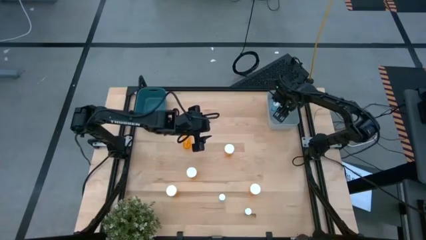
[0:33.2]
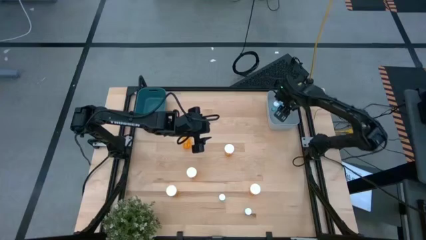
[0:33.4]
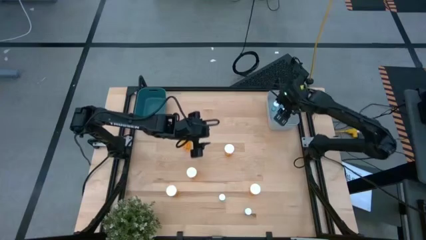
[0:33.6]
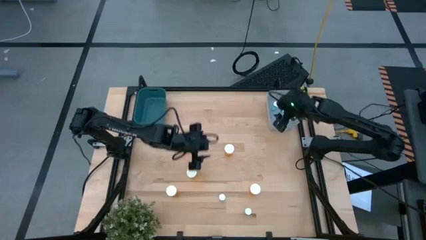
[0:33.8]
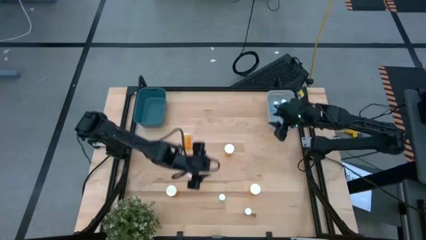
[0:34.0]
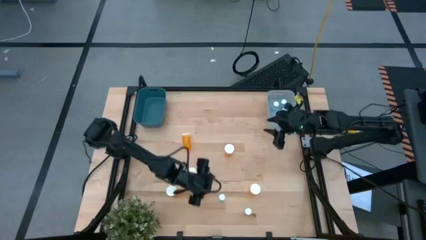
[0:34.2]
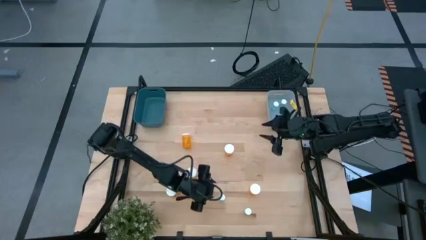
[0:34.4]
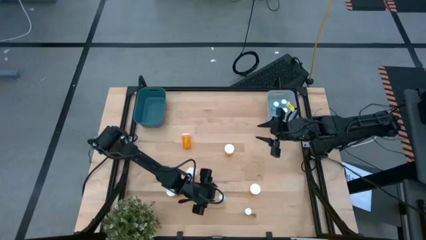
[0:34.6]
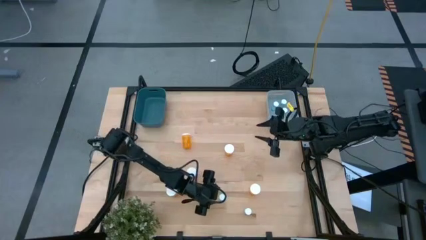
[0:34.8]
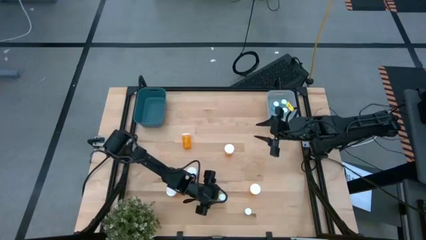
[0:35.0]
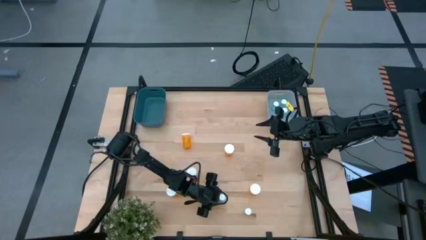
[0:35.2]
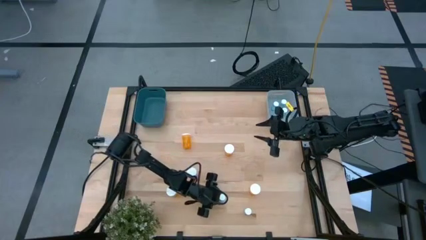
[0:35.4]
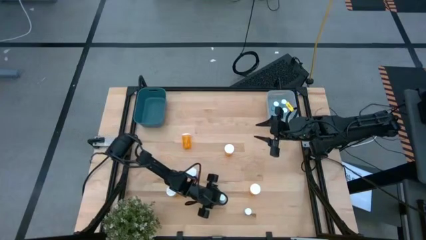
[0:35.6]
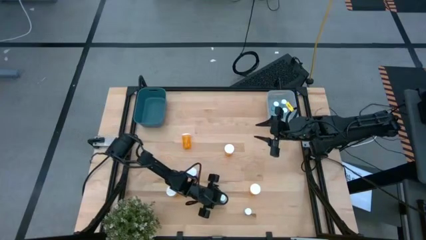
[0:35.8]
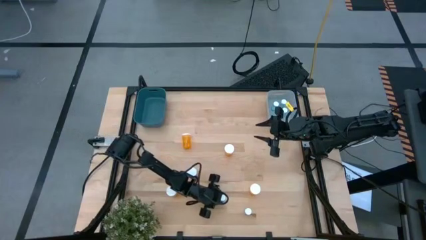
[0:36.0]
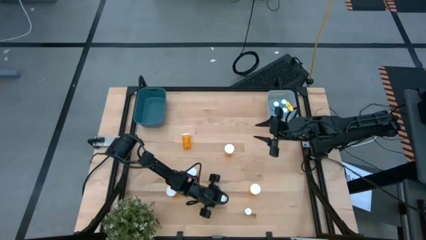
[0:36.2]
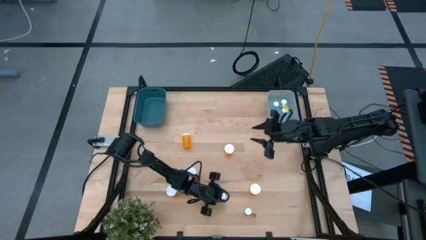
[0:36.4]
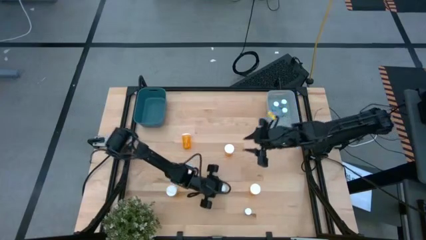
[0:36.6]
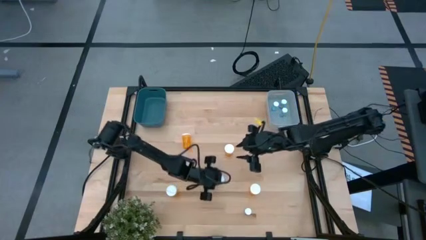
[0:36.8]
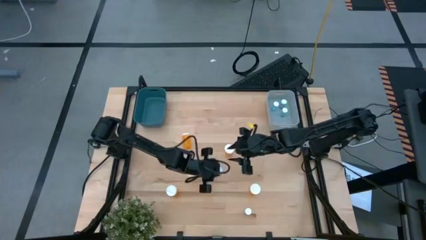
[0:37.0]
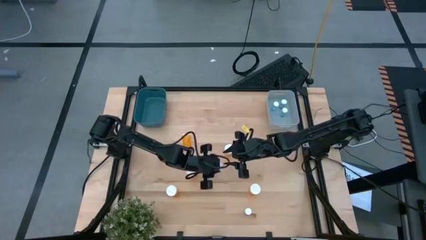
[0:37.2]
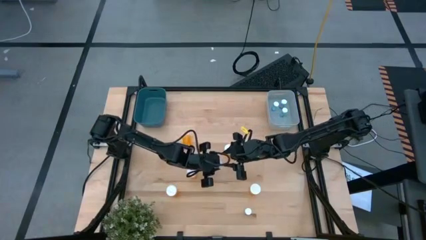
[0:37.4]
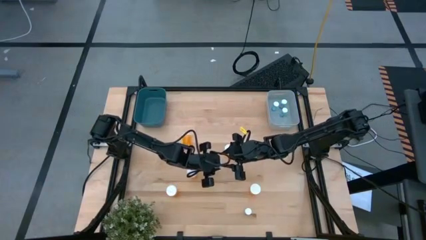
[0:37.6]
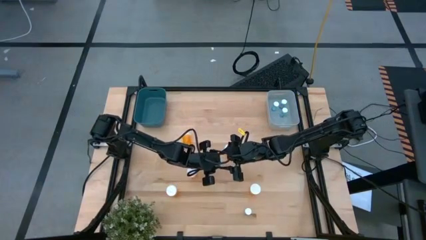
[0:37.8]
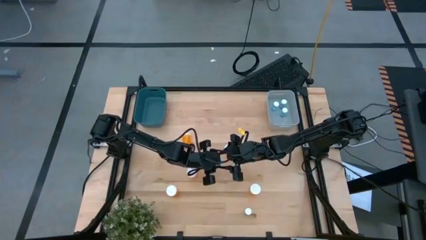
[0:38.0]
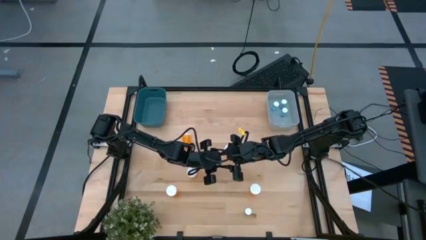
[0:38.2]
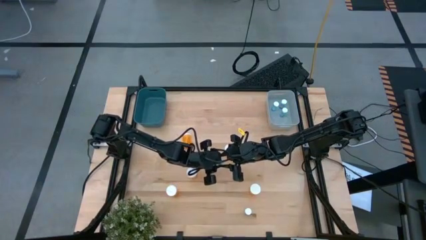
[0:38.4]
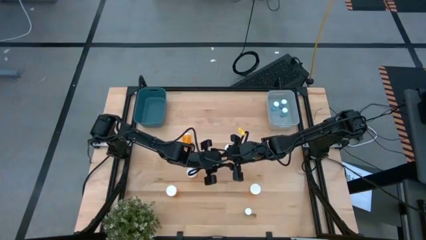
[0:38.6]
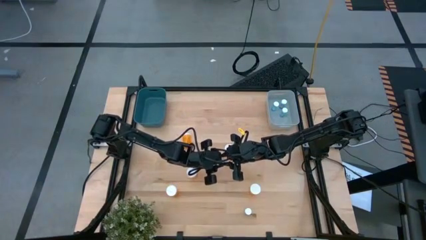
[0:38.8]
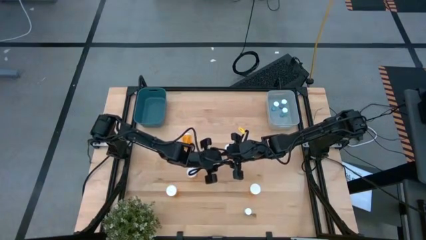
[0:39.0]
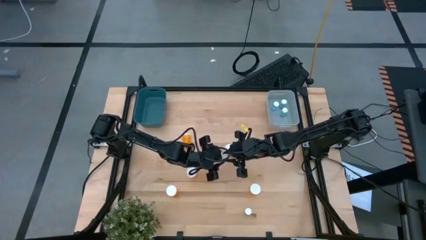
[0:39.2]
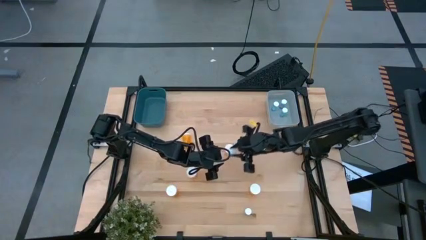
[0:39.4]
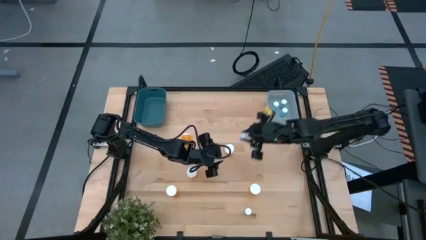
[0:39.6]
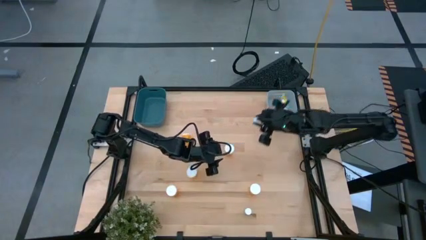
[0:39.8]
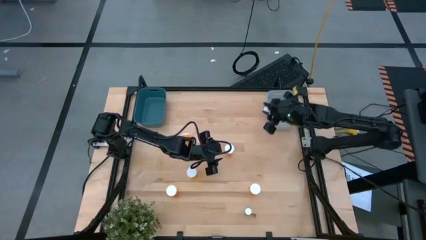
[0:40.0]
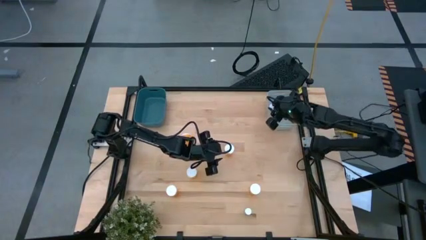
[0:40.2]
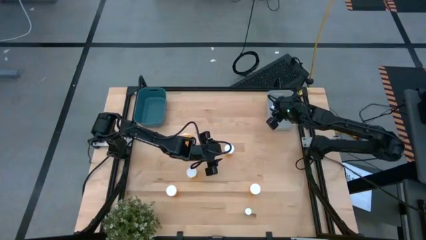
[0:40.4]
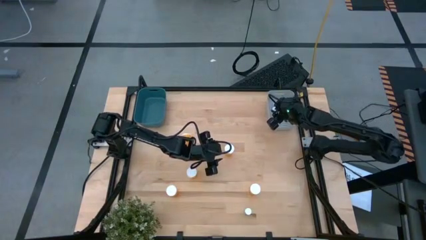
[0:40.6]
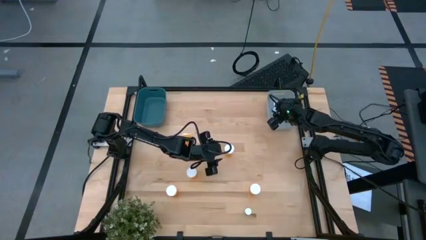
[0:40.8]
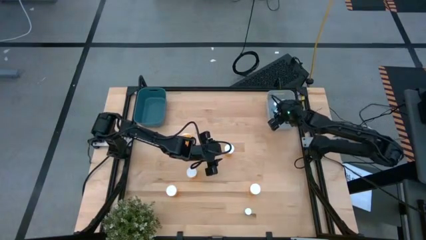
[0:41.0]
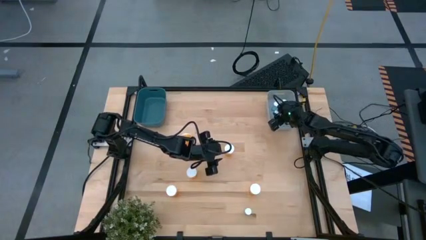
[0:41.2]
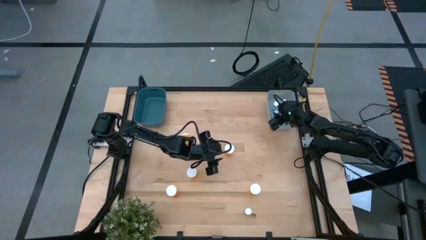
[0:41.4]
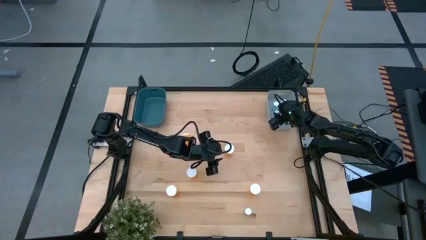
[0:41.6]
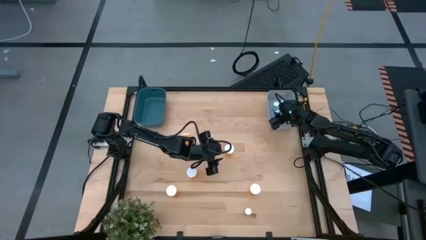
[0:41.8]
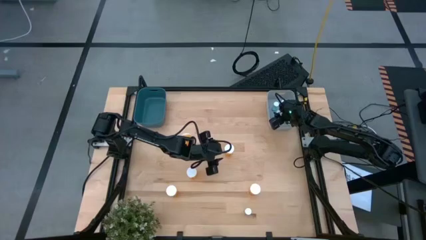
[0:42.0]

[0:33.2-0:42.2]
Task: Pick and place medicine bottles into bin by pill shape (circle, oval)
Put the blue tablet bottle into the gray bin

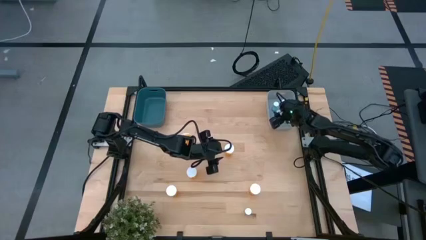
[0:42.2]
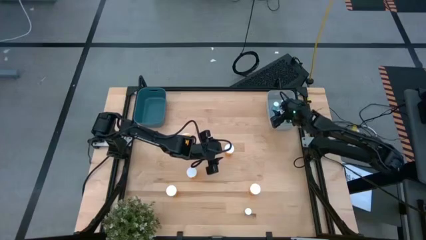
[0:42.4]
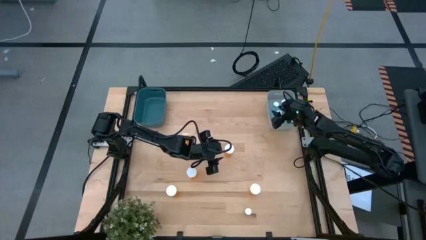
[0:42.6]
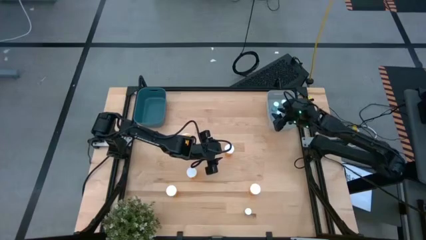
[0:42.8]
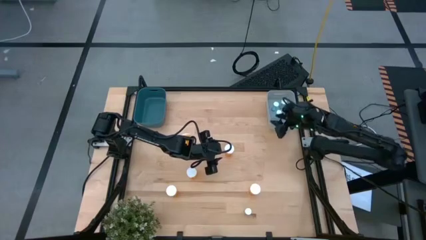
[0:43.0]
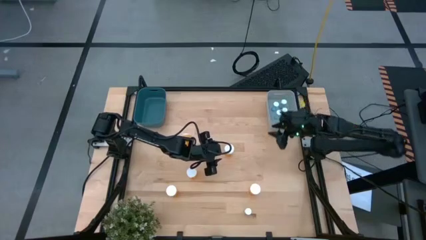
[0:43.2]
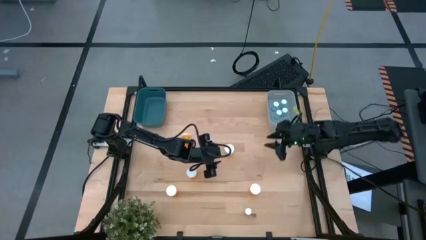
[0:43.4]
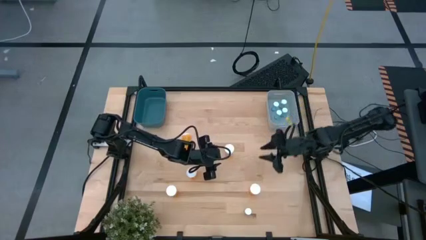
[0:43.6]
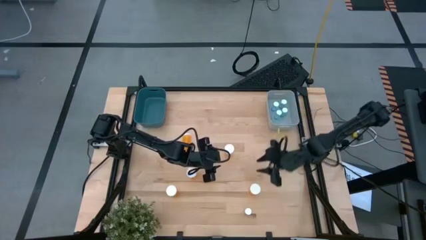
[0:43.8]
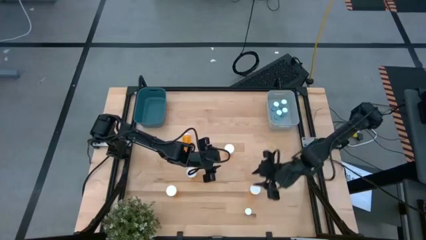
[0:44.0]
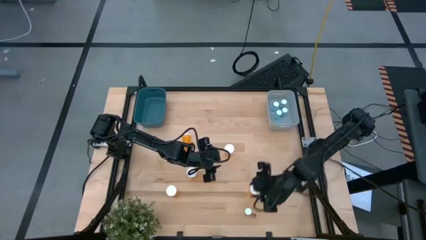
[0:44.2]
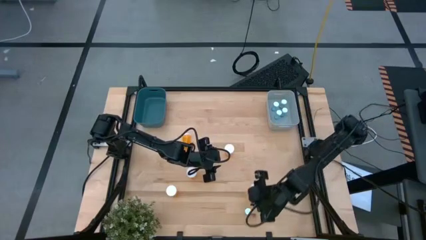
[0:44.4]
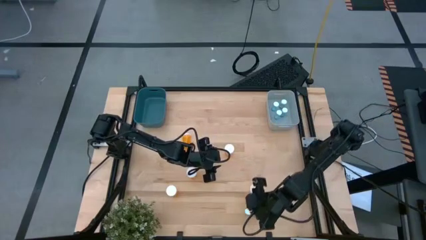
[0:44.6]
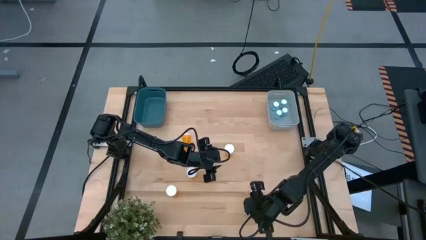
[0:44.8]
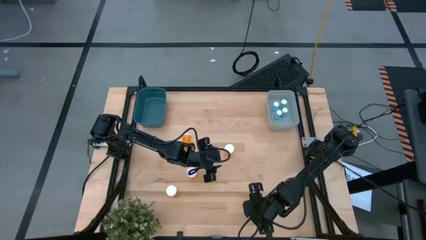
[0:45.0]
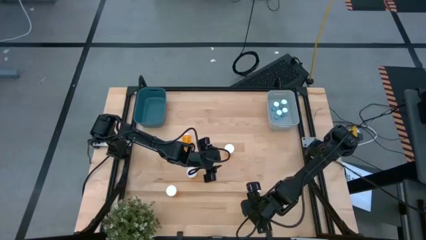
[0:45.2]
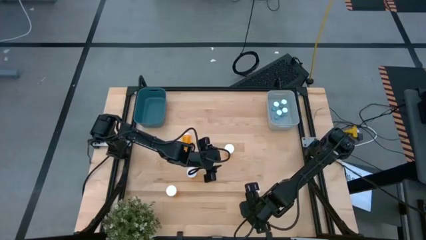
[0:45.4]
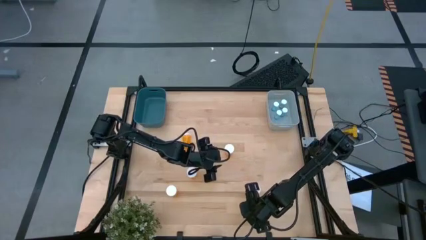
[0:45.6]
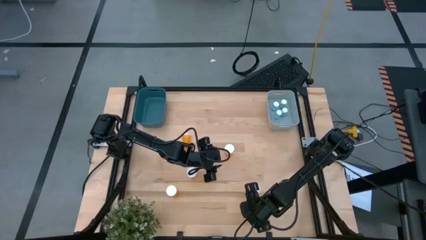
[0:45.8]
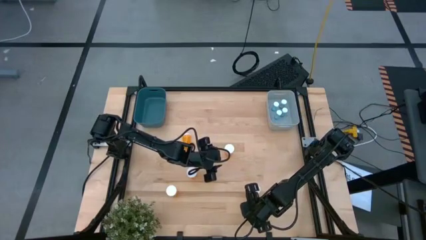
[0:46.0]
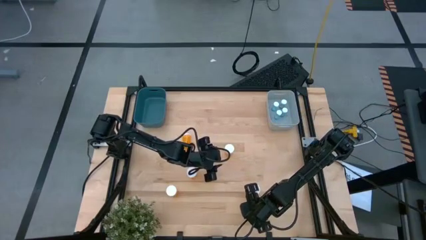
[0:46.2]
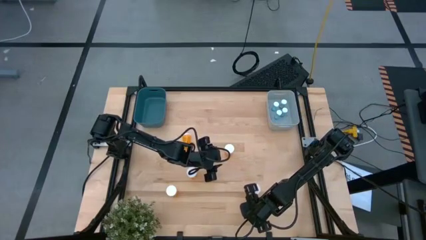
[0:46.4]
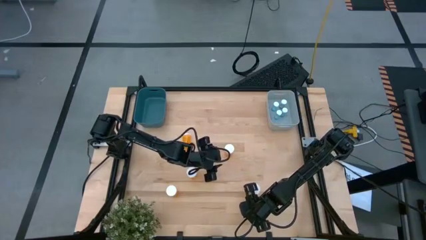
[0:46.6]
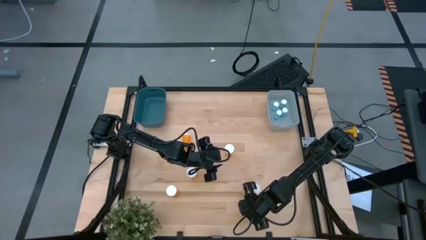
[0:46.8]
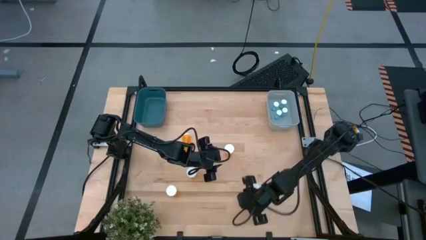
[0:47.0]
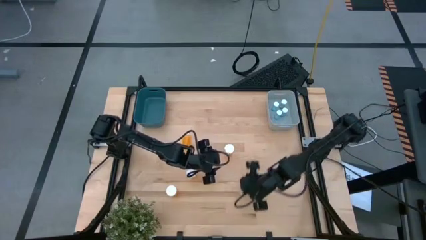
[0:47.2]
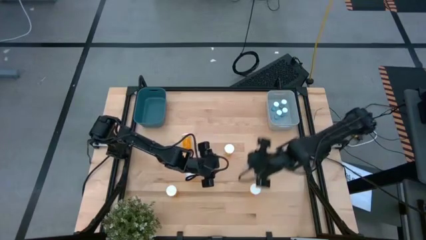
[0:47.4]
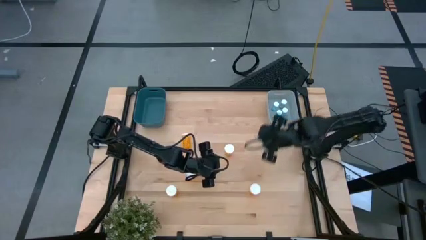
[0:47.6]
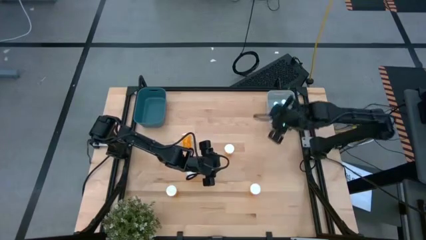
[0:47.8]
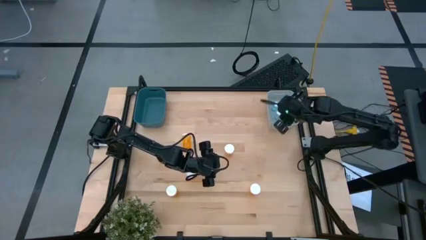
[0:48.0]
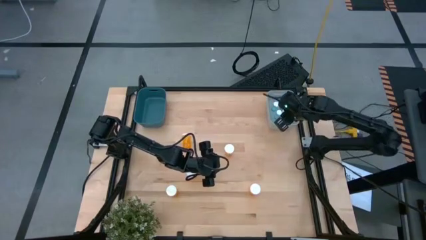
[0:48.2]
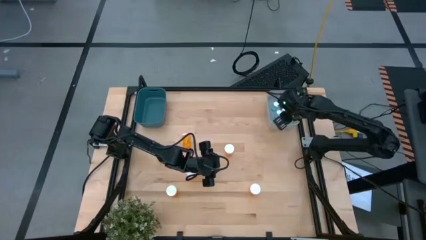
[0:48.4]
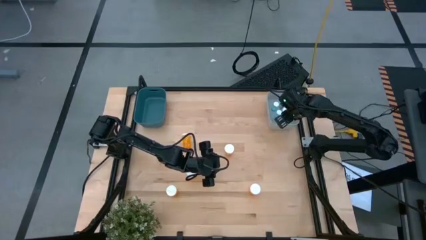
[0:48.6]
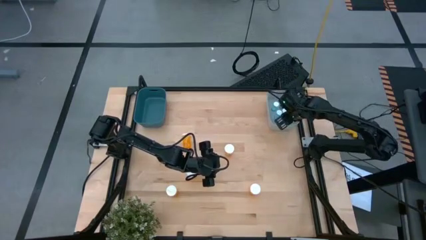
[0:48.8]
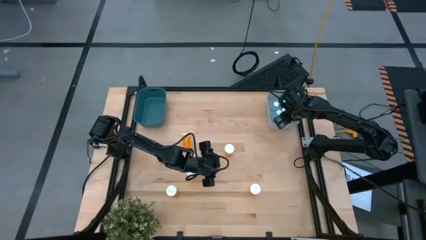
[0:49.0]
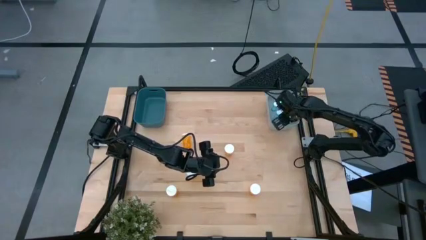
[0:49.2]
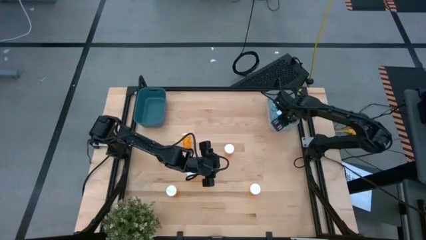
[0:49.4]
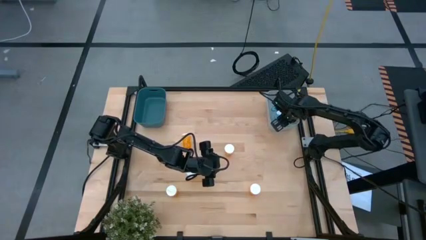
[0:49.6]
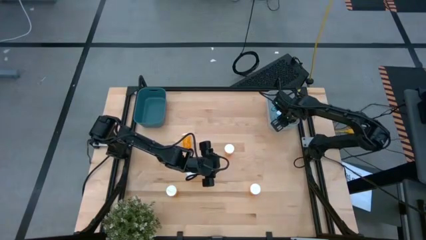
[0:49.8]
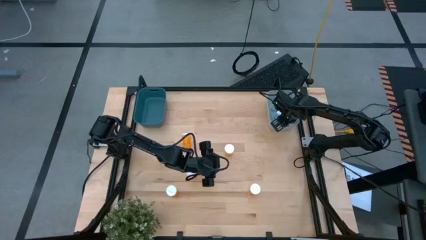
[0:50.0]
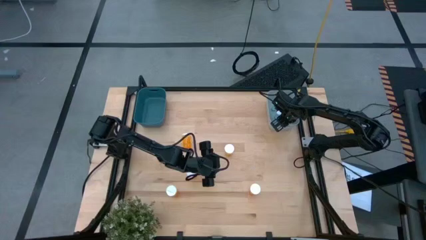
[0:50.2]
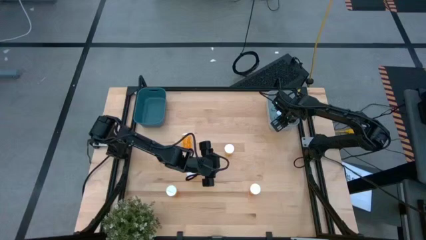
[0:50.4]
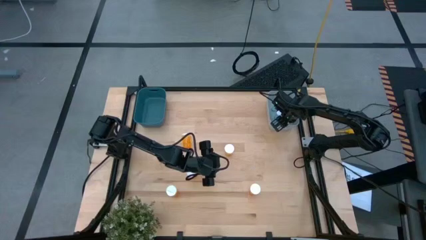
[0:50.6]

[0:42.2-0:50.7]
Put the blue tablet bottle into the gray bin
